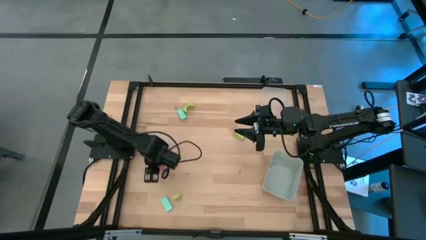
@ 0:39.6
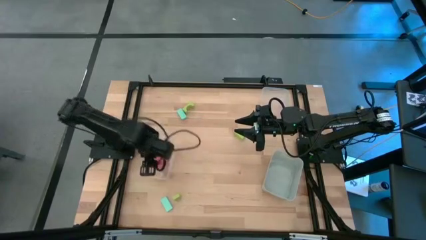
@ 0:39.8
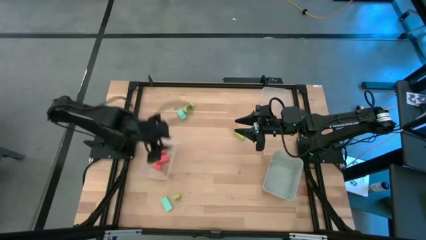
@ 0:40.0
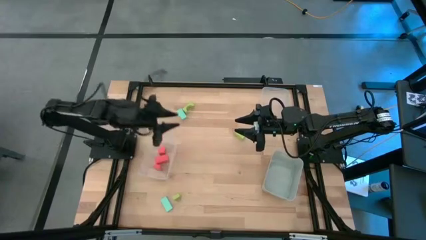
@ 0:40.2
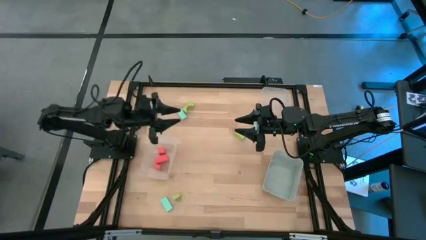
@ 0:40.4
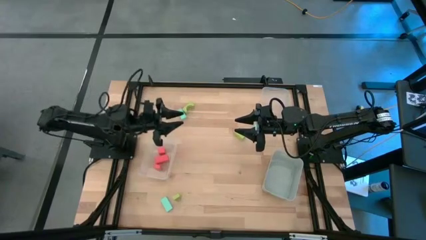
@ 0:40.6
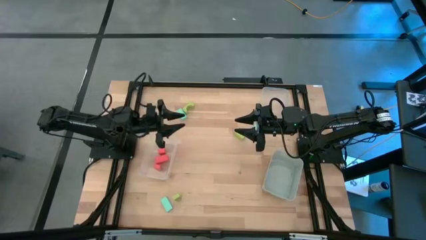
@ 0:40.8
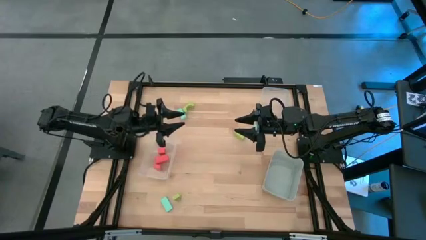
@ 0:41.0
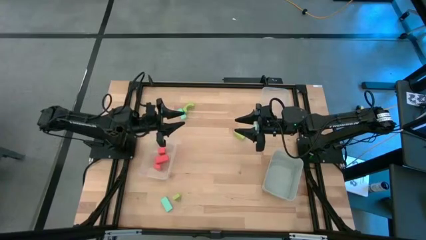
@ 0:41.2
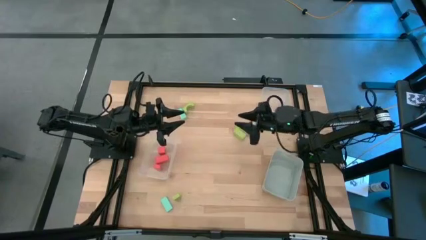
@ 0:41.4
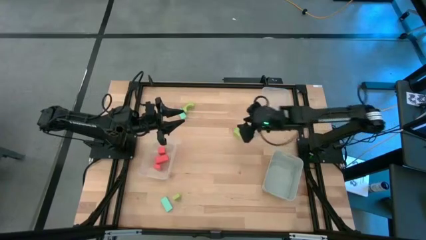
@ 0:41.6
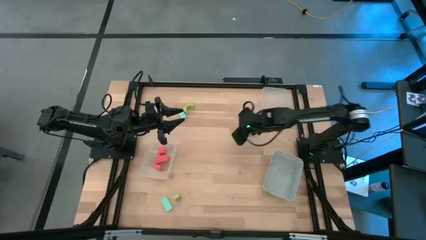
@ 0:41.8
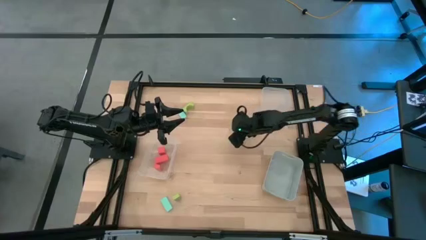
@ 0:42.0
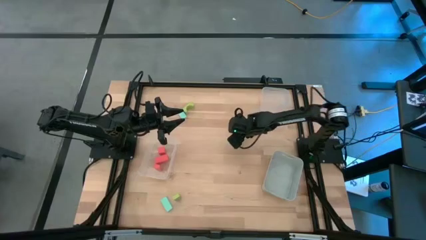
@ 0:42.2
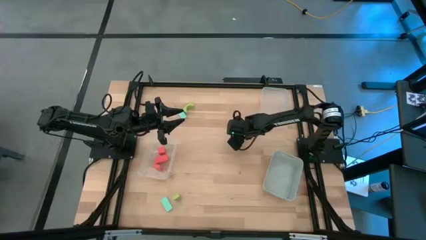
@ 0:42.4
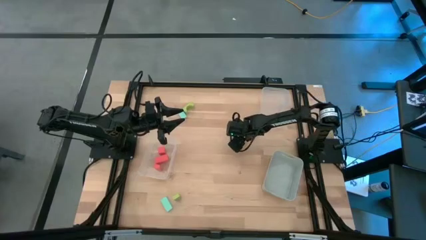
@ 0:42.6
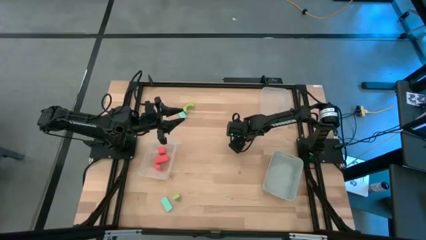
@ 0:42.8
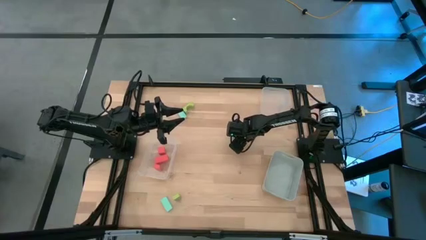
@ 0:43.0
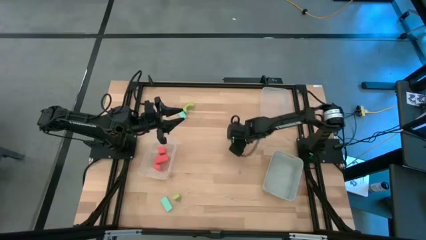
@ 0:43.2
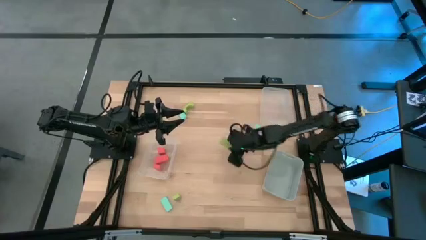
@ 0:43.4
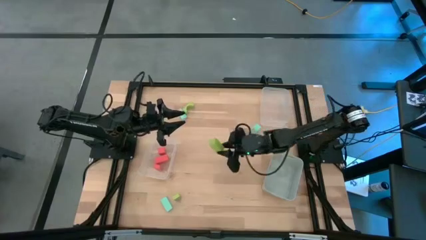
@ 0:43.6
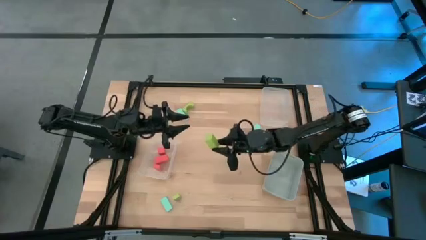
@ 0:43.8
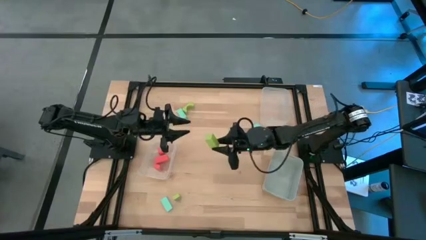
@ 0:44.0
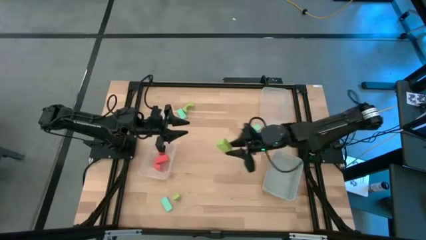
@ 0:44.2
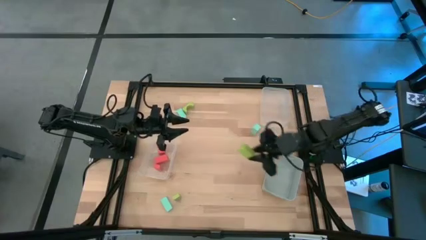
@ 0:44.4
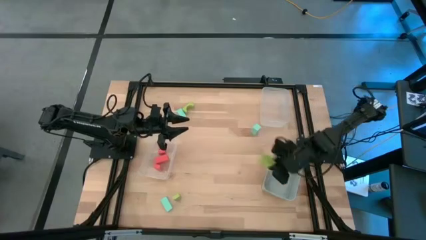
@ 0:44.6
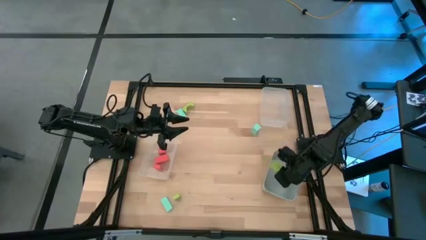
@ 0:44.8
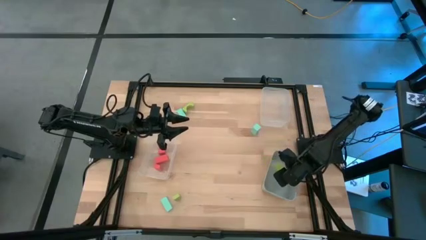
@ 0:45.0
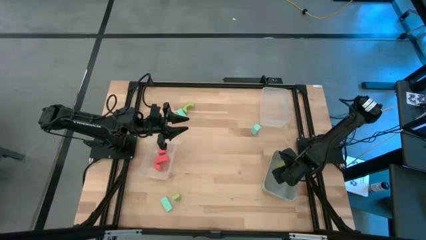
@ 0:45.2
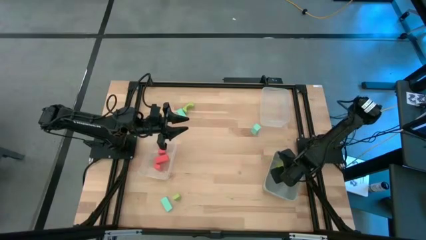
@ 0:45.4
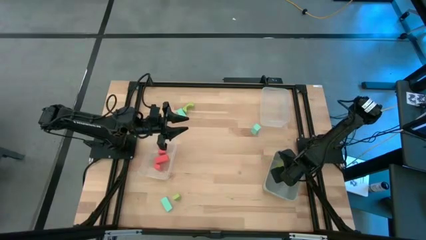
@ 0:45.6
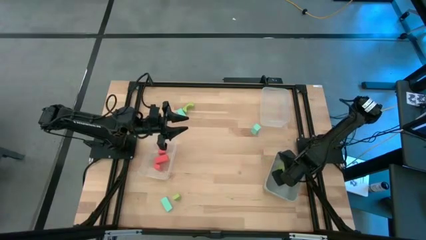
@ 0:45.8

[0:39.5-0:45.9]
Task: Sort & place blocks by color
Put the middle green block into the gray bin

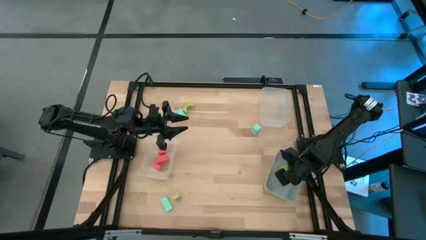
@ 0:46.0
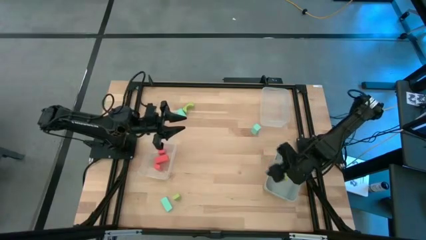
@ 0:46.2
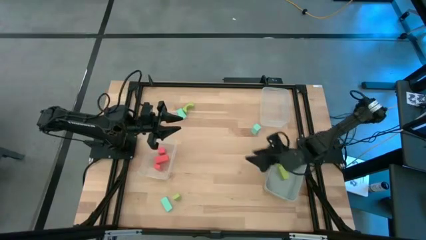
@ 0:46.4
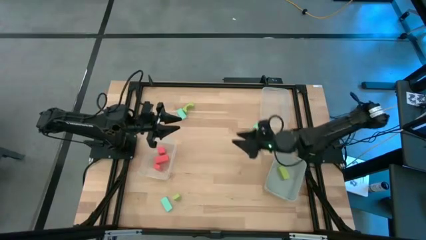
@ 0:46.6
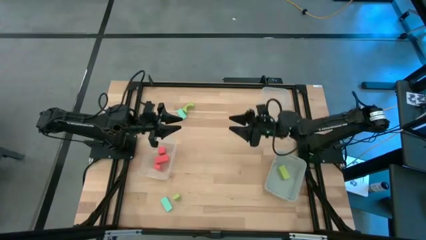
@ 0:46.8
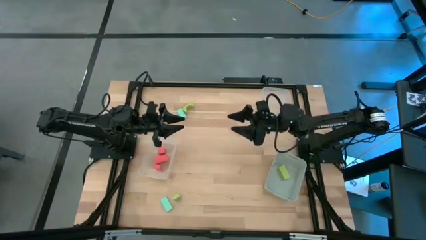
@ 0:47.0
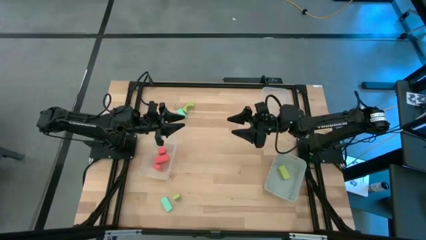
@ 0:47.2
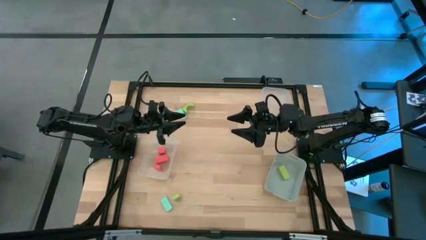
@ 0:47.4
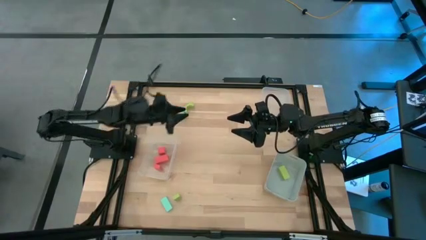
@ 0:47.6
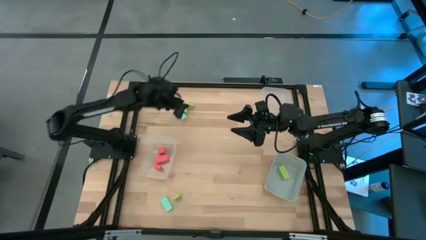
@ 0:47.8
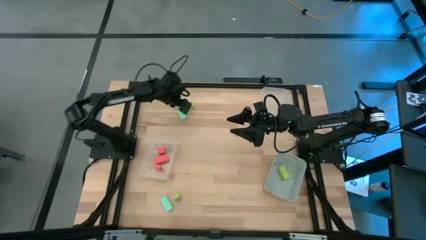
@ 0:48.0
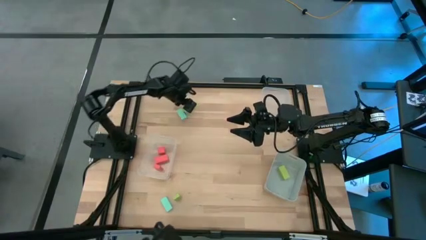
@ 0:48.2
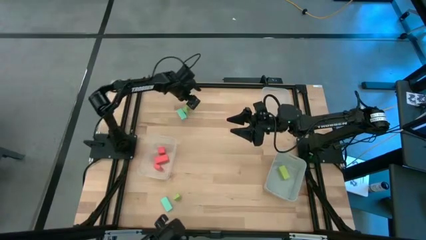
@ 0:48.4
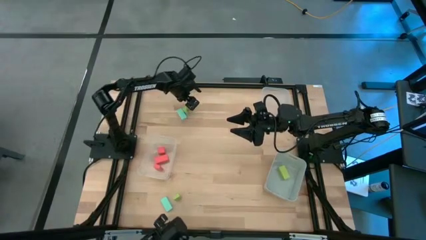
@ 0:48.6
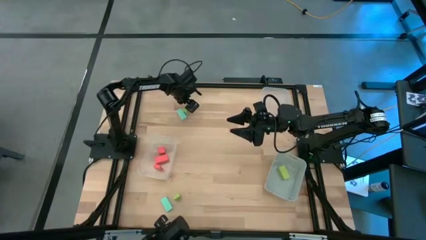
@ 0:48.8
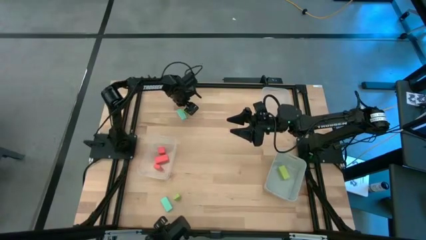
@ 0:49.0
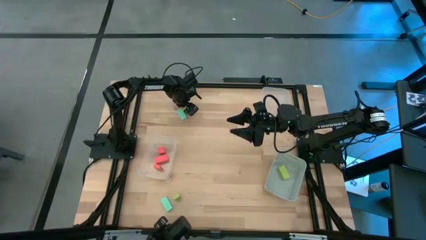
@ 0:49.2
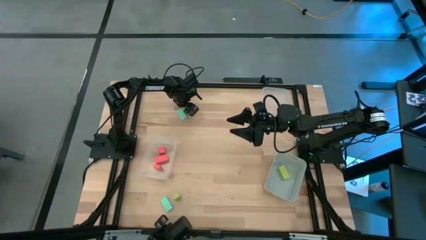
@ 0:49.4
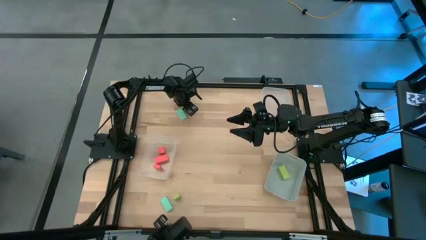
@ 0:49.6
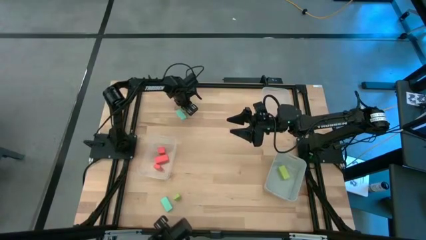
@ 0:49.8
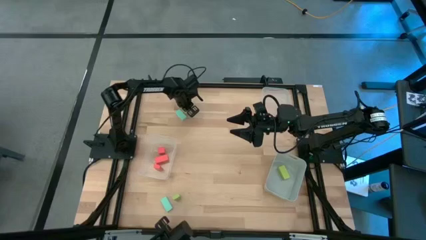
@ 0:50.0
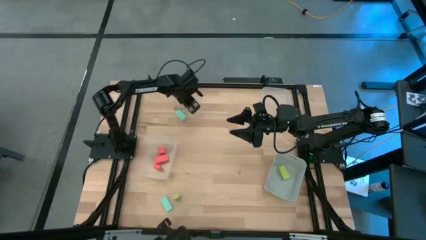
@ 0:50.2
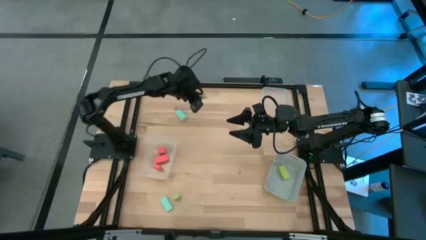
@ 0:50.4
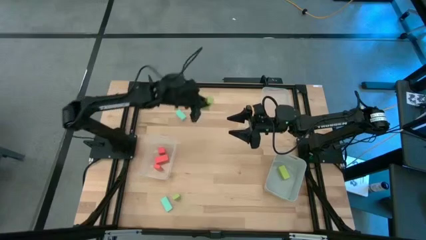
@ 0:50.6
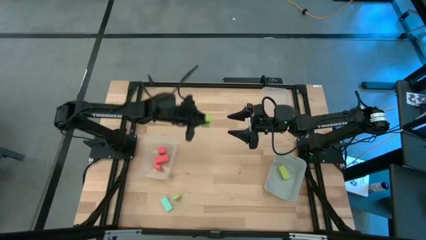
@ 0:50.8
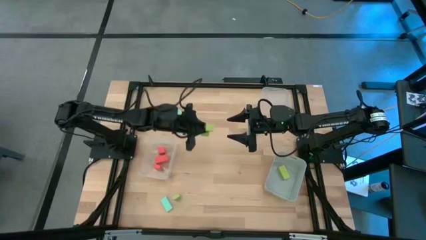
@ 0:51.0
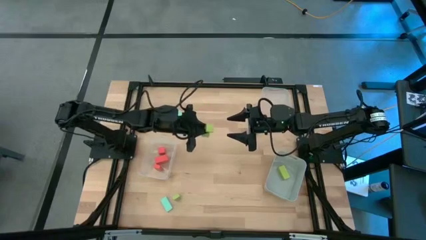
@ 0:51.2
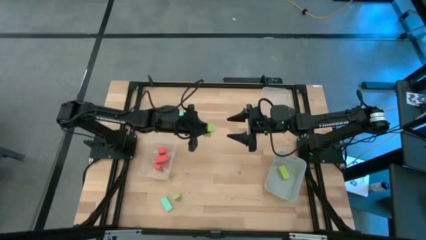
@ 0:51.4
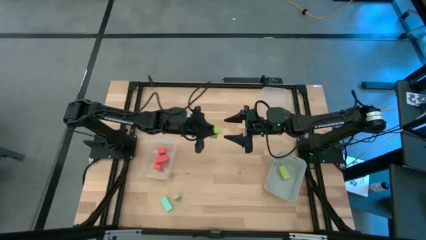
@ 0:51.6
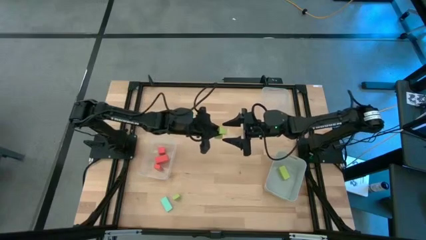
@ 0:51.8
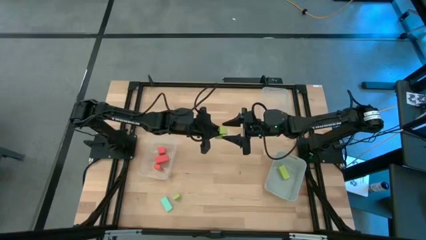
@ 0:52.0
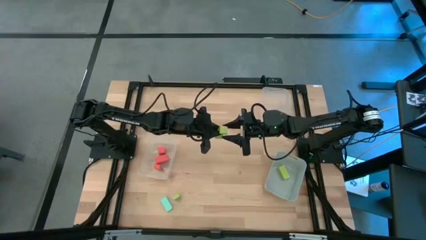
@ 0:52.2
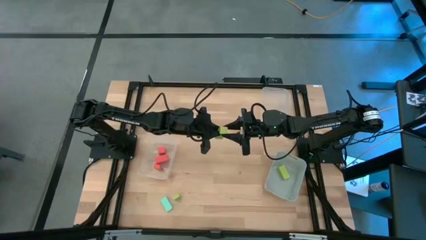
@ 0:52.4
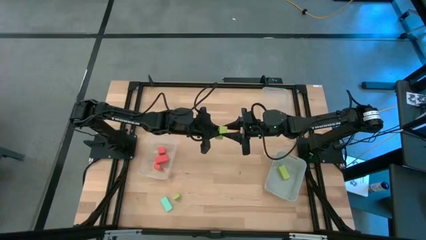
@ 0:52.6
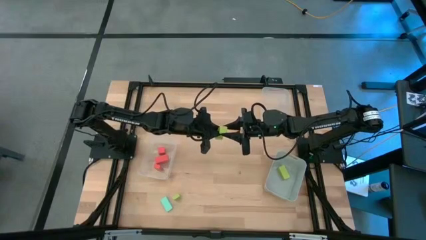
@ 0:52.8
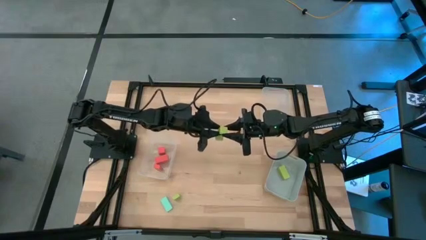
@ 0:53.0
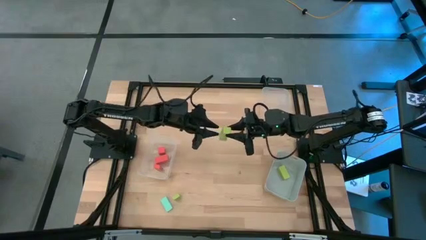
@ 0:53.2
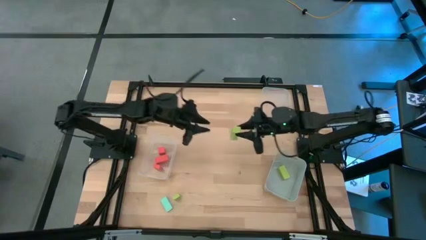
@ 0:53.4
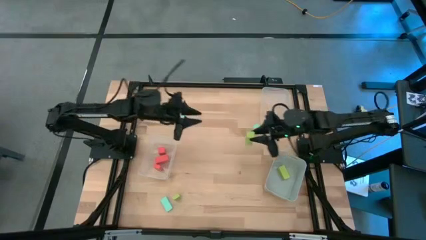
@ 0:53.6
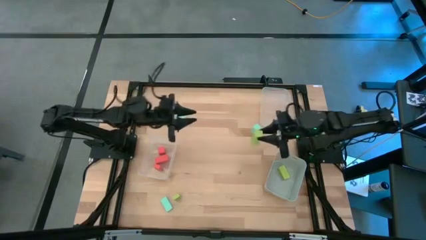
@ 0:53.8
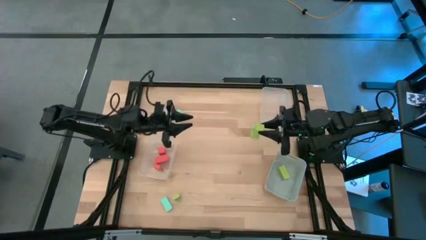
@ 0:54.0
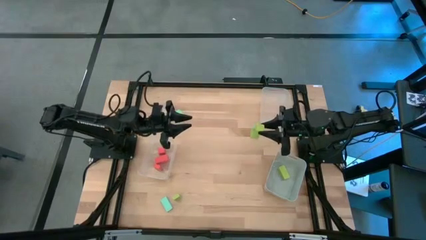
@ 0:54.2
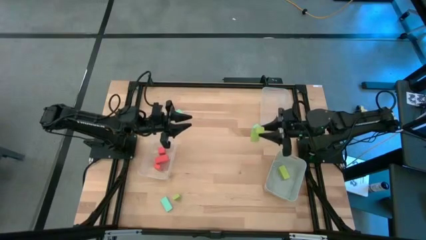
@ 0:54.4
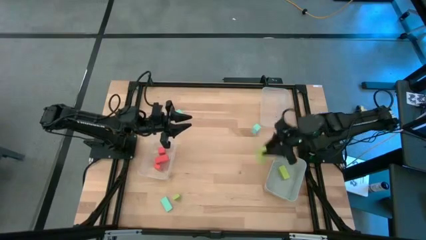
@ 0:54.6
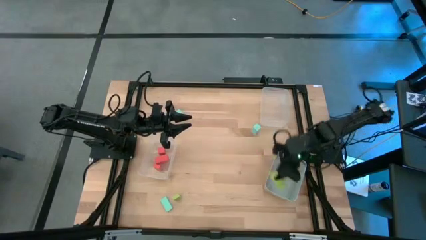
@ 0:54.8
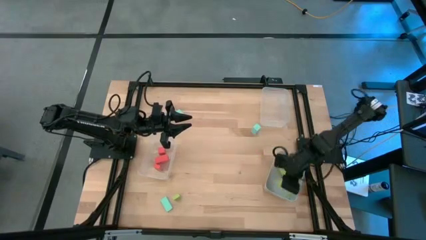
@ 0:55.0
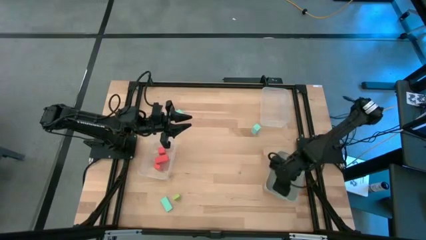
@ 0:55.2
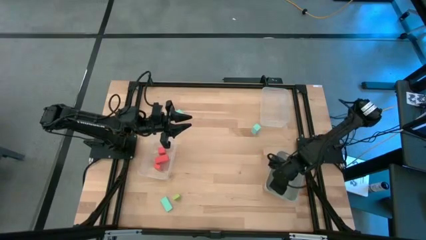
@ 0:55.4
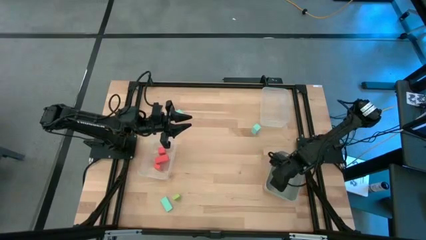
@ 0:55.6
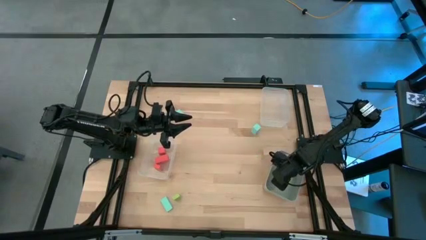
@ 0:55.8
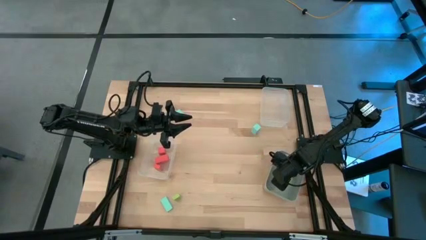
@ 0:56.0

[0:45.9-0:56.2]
Put the top green block into the gray bin

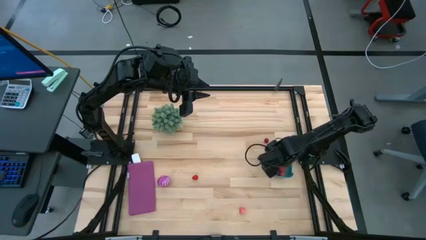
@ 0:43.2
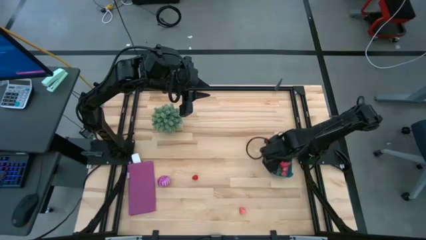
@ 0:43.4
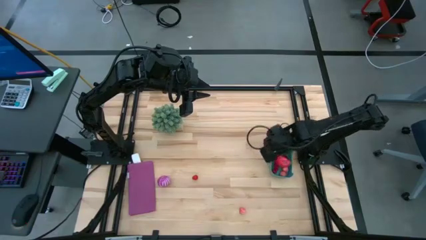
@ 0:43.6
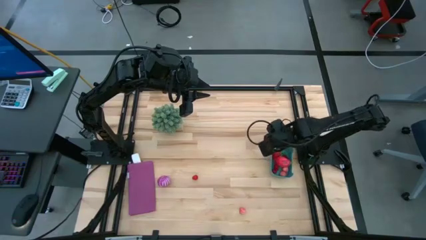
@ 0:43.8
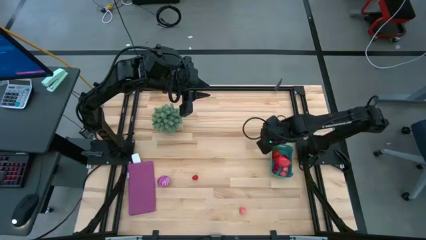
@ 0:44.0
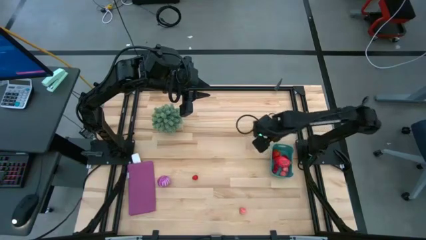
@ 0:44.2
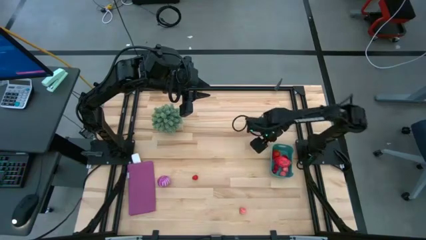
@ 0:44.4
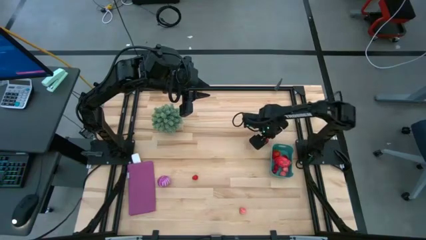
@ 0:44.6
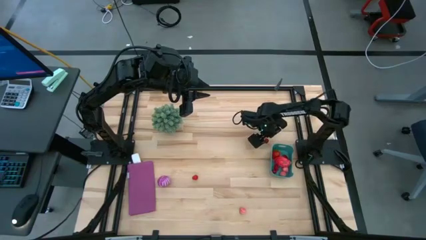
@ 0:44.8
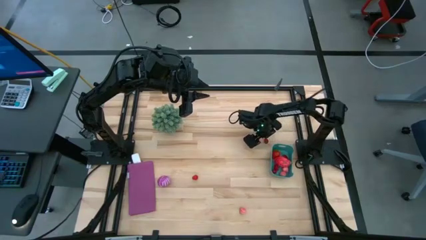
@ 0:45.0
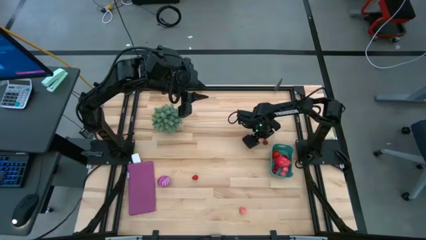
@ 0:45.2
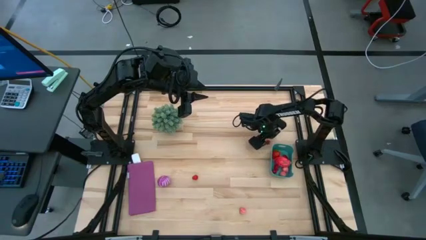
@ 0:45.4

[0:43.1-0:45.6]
Task: Pick and placing Produce into tupperware
Put the red cherry into the green bin
